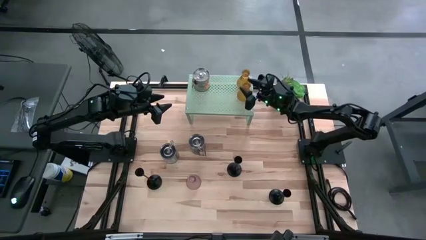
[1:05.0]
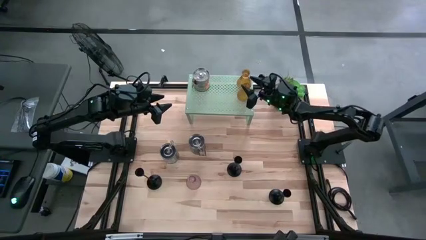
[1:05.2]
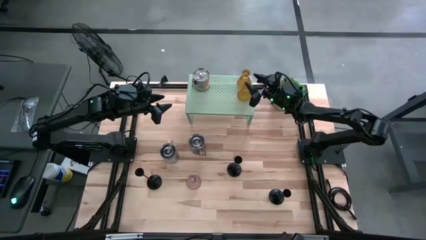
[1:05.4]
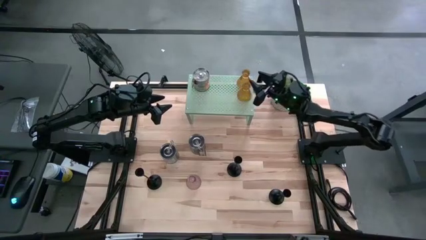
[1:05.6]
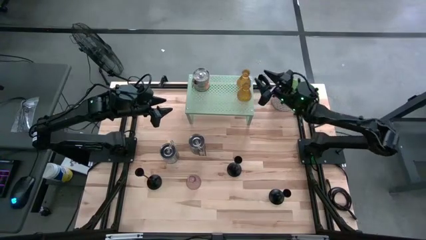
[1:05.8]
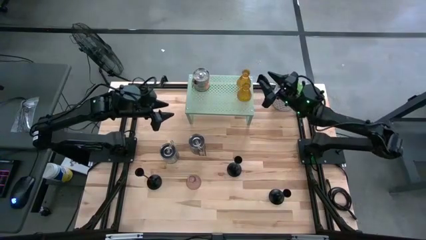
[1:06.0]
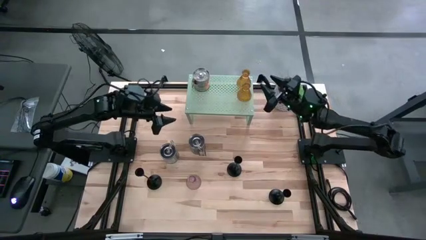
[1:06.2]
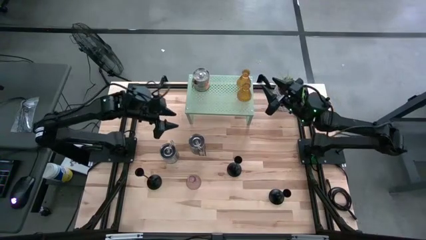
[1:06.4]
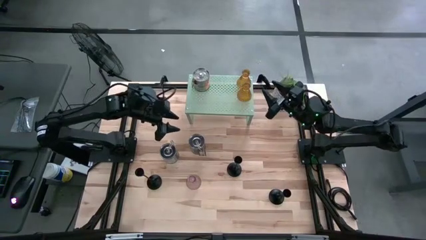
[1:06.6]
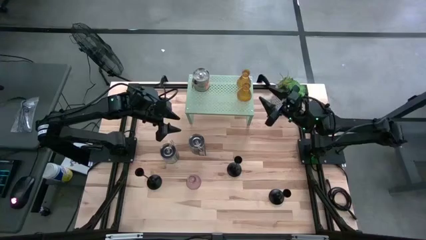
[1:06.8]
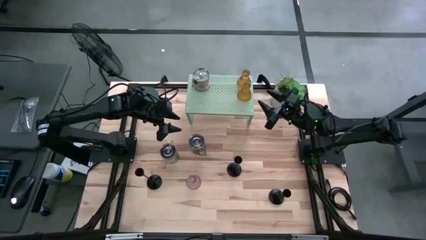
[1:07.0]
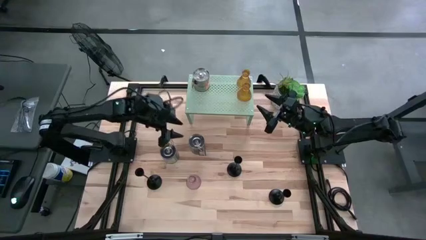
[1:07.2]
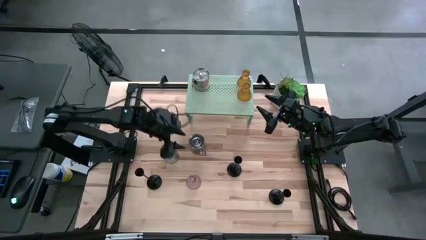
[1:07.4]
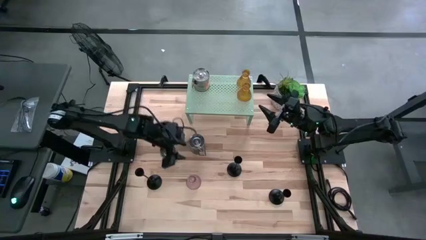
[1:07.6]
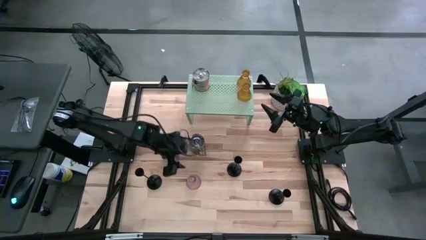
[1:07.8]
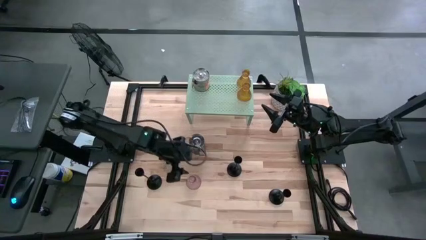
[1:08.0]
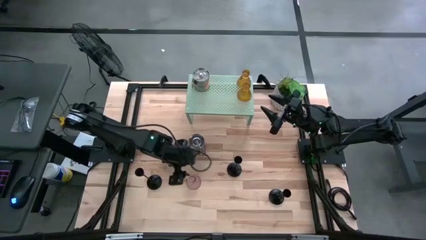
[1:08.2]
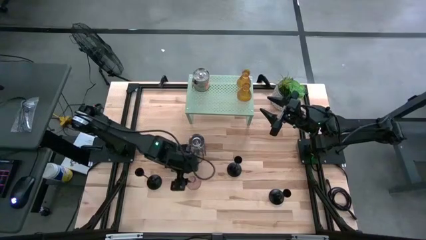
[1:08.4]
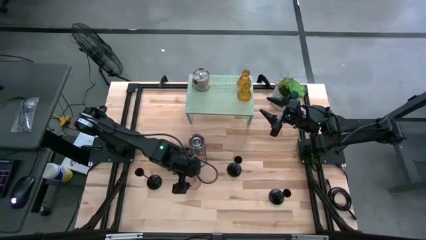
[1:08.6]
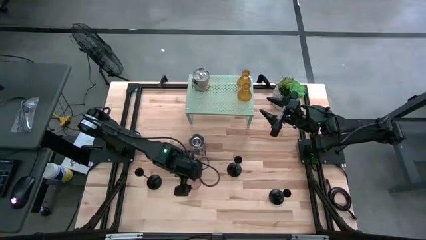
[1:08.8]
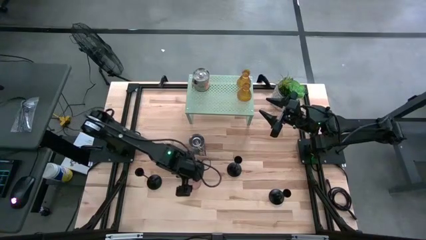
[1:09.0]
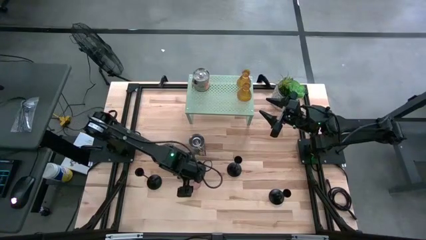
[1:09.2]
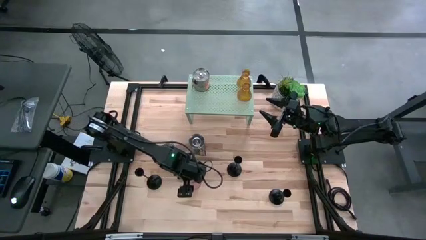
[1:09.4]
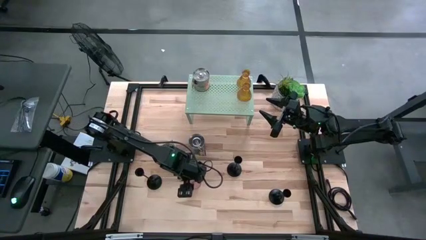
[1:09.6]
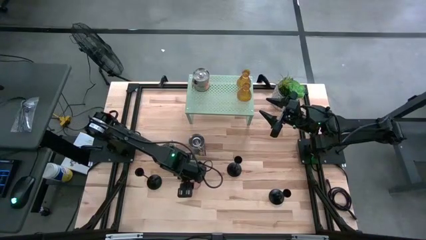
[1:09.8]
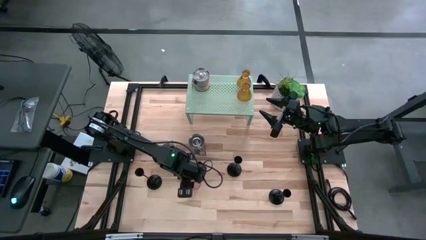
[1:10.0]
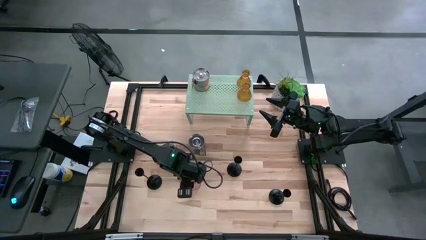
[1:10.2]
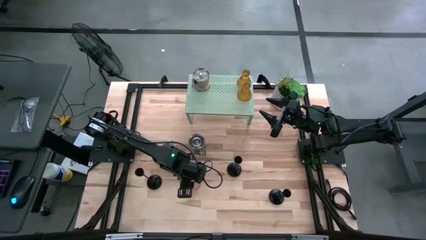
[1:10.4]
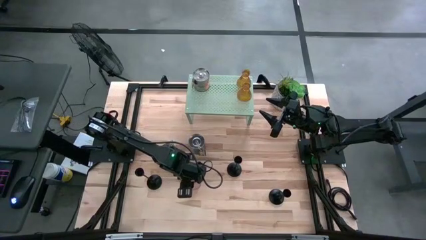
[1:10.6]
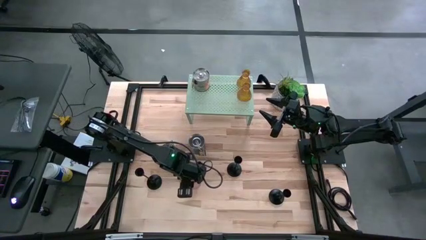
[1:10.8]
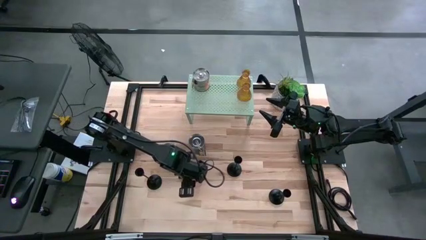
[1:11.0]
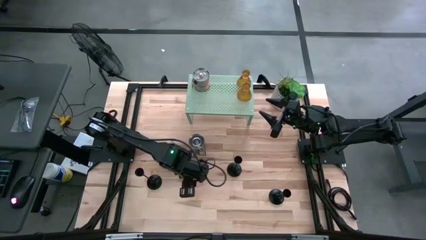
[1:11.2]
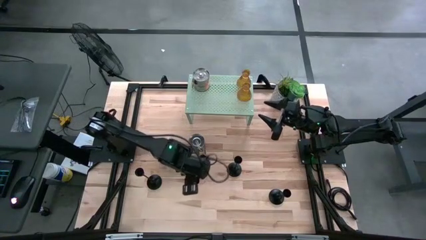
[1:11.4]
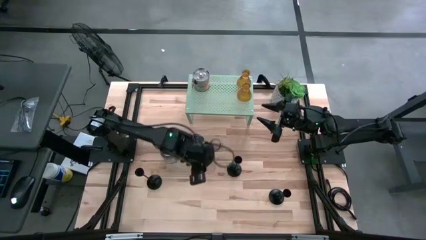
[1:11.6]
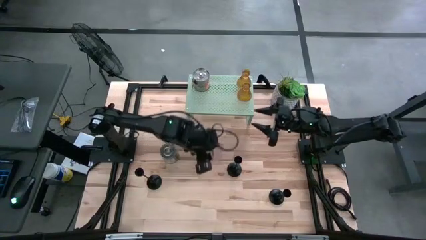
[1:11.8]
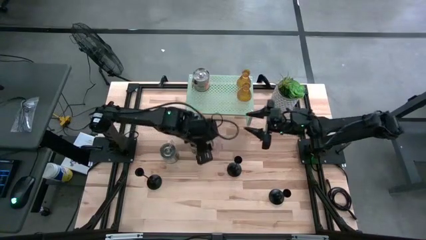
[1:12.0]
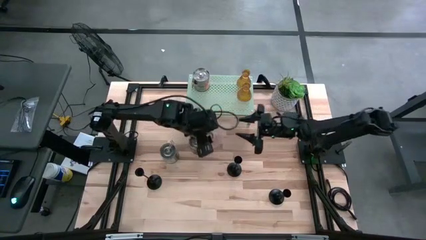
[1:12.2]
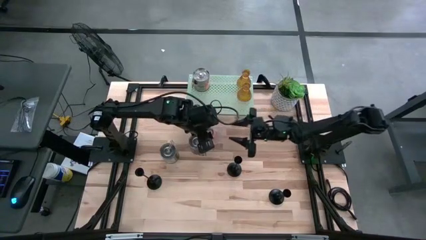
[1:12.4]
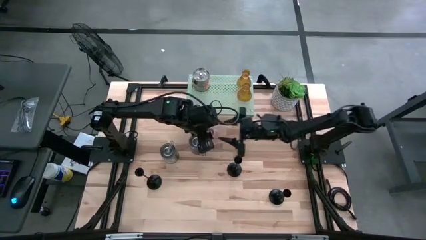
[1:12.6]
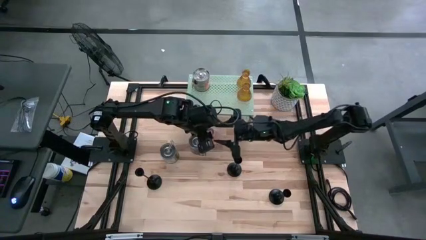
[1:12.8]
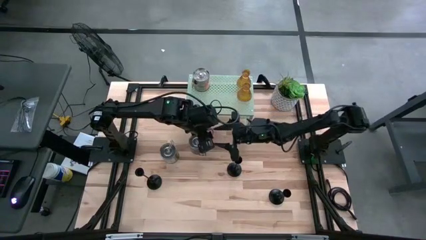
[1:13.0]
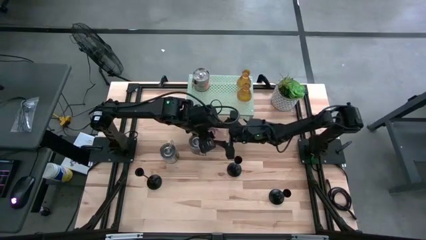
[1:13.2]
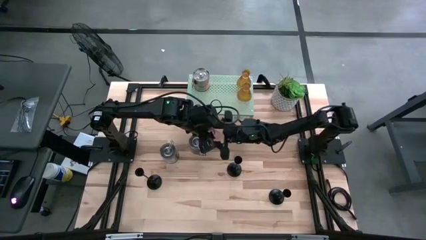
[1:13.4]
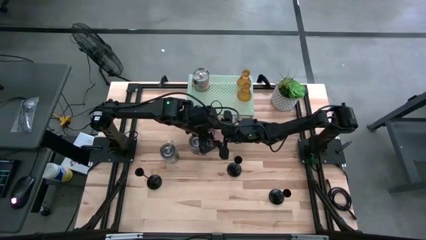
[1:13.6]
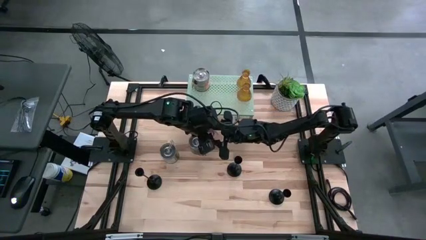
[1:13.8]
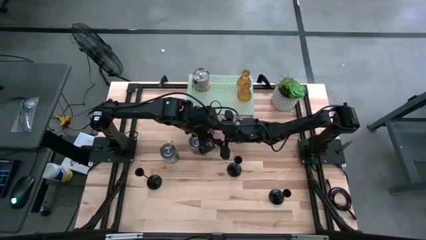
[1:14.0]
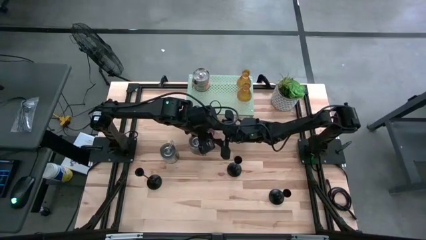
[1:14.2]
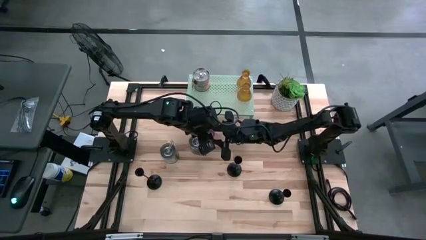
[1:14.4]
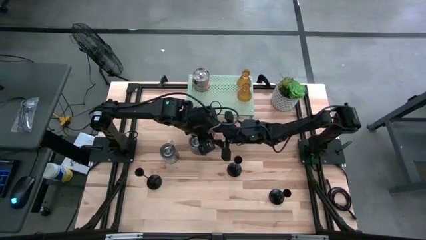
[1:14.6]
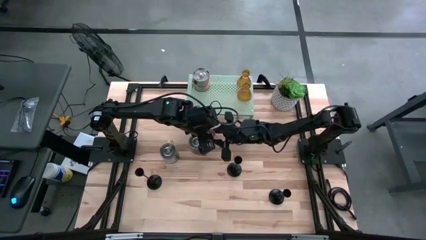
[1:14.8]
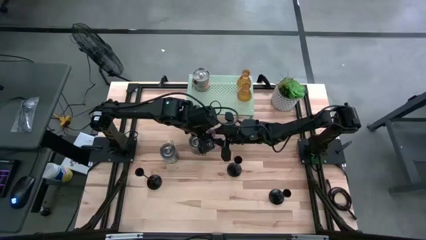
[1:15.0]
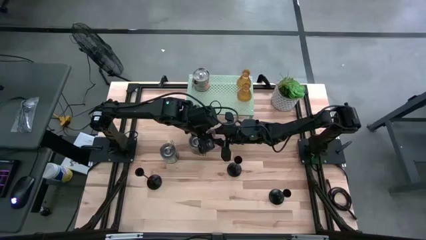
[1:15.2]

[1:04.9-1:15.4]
Task: Pick & Place candle stick holders
Put the violet candle holder on the shelf
